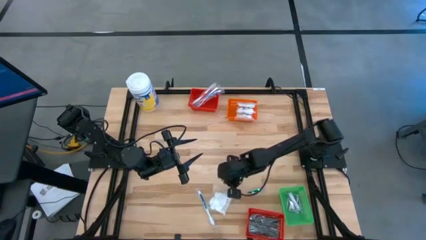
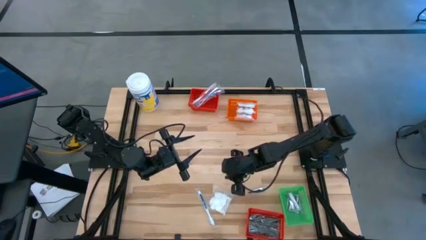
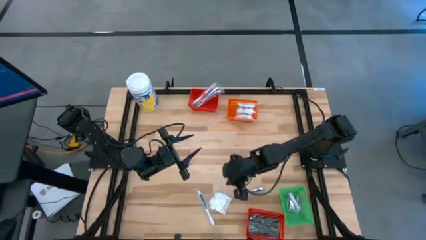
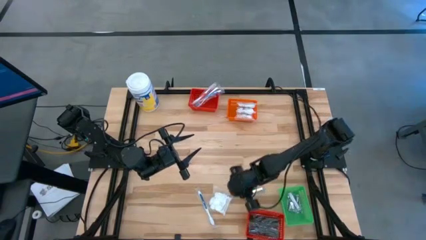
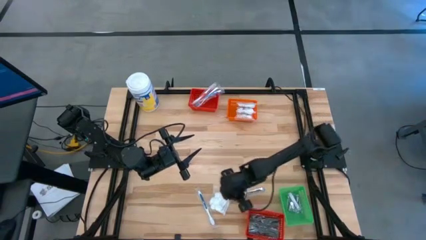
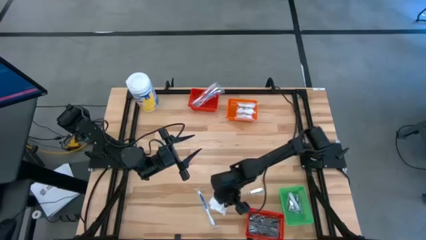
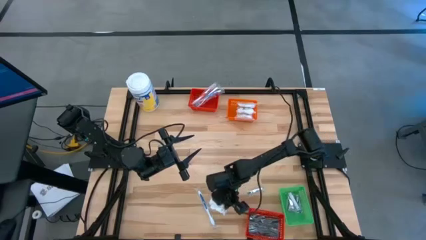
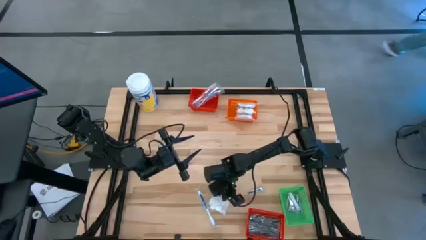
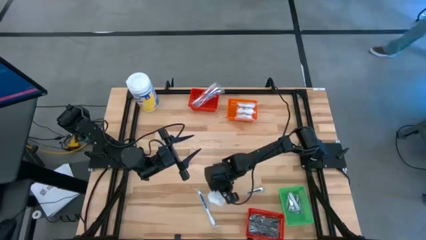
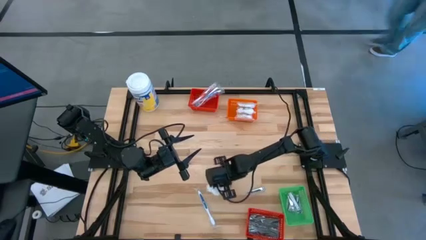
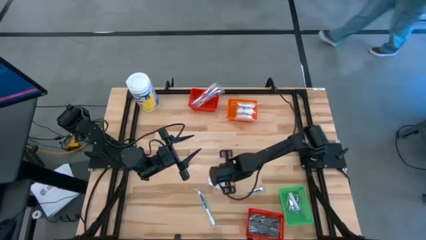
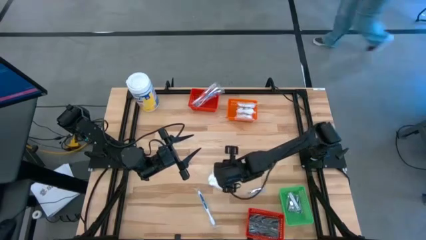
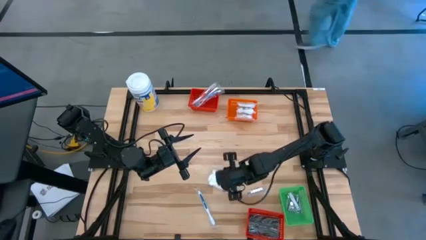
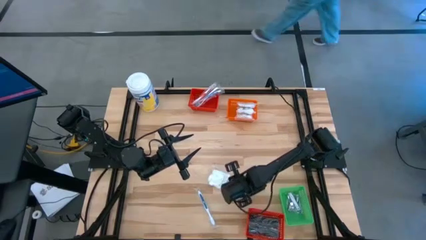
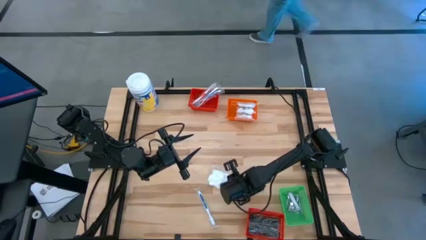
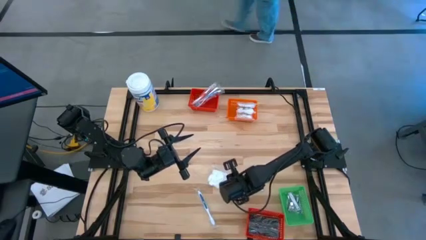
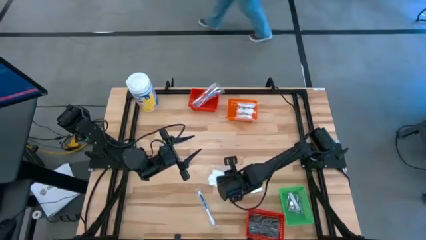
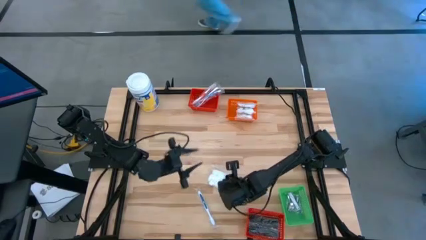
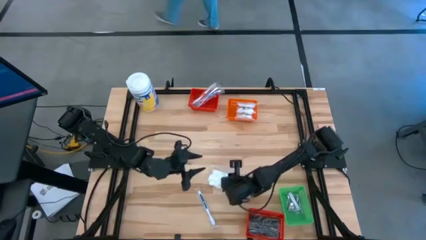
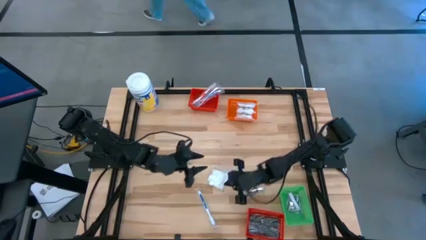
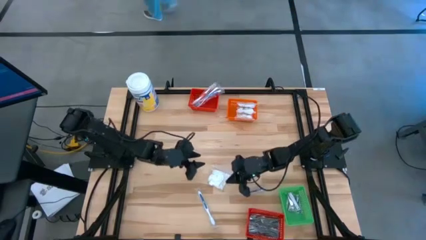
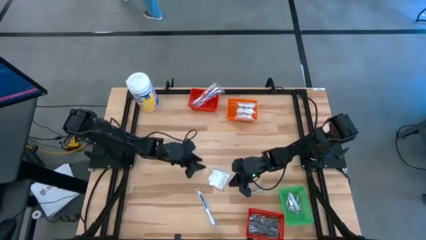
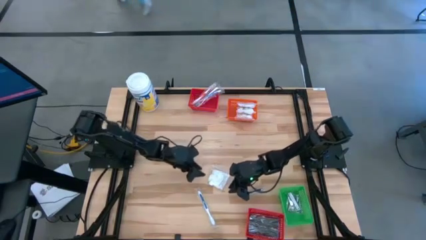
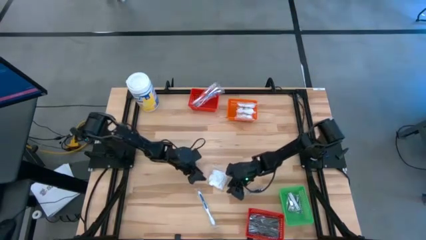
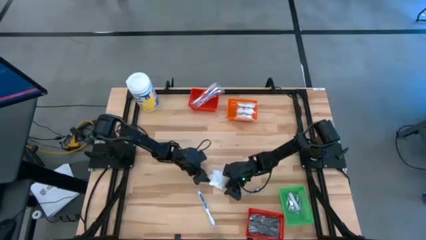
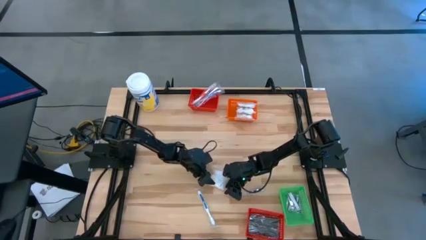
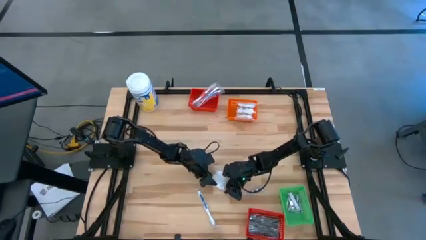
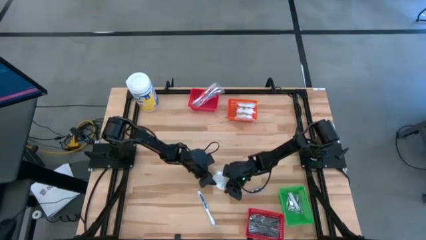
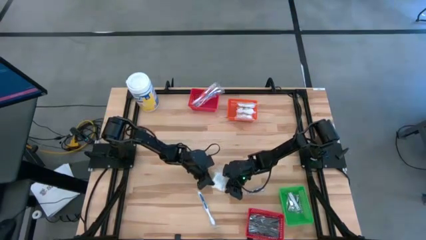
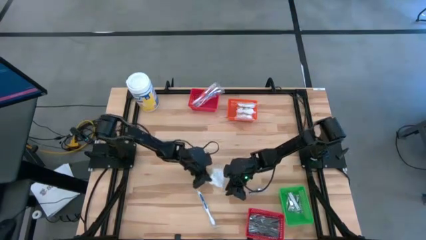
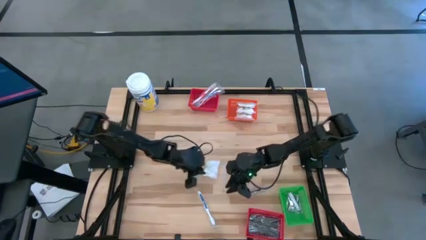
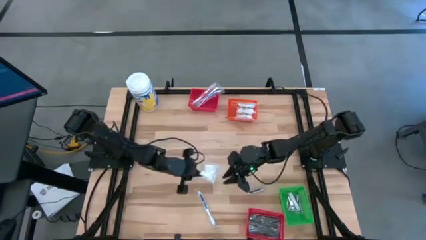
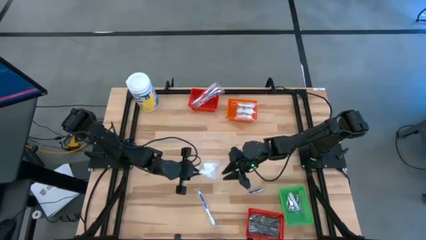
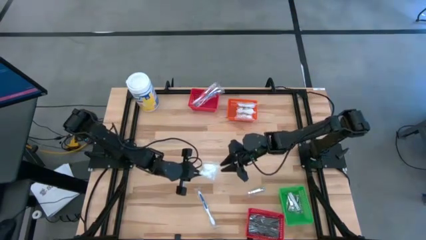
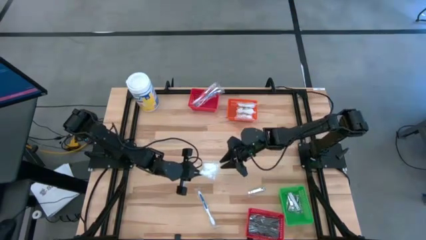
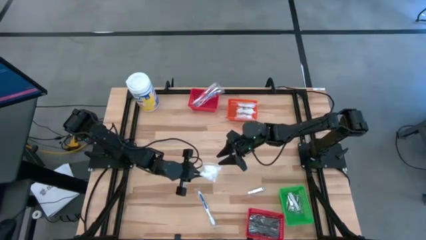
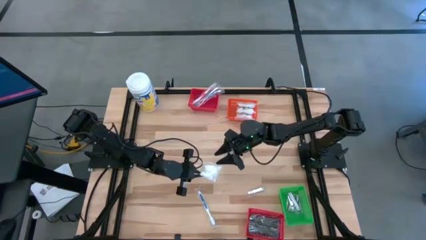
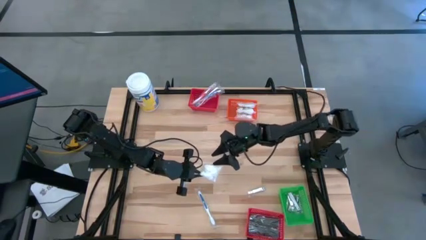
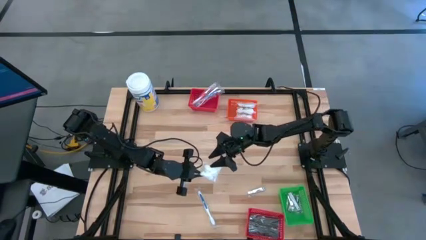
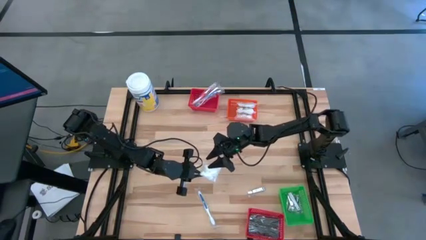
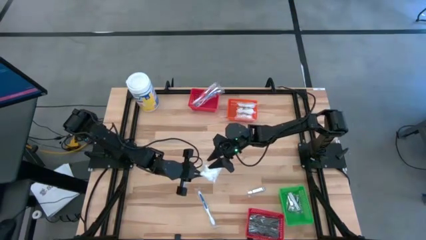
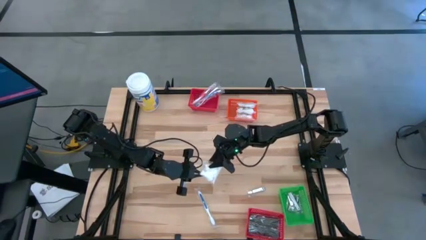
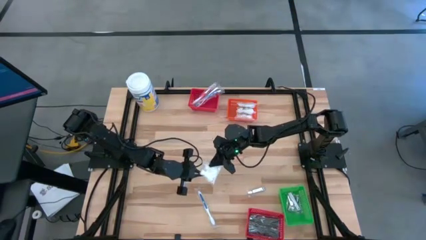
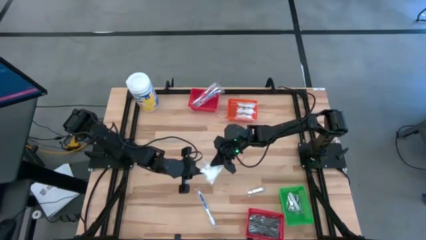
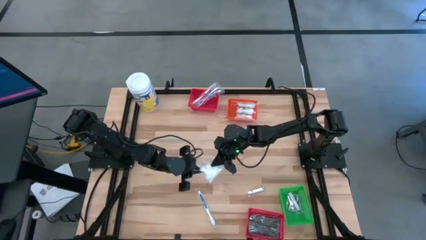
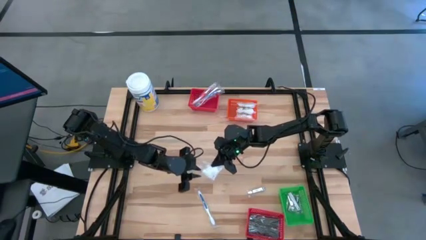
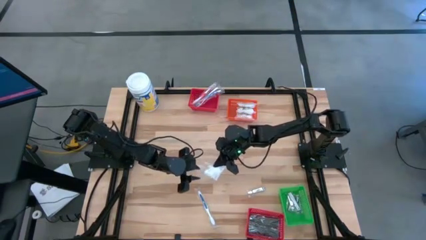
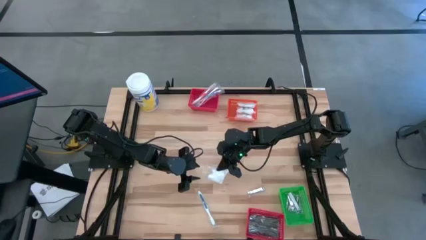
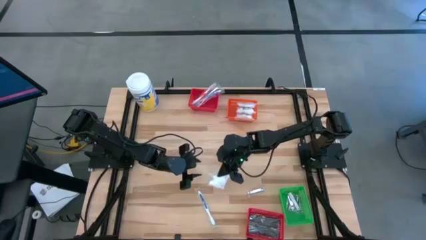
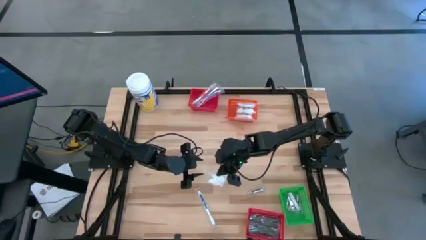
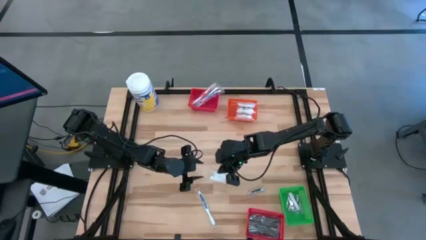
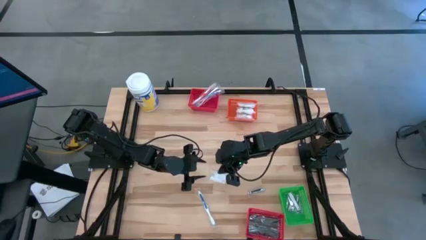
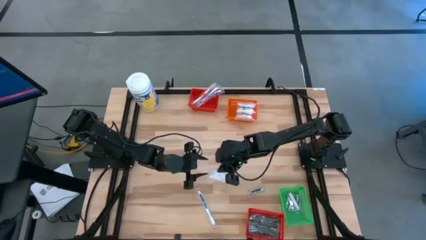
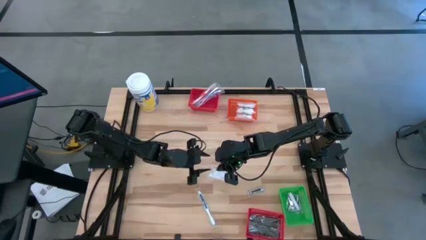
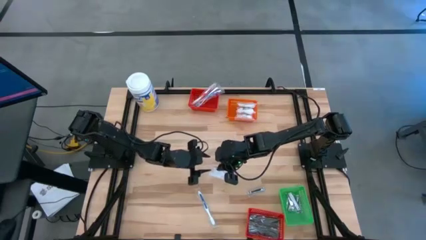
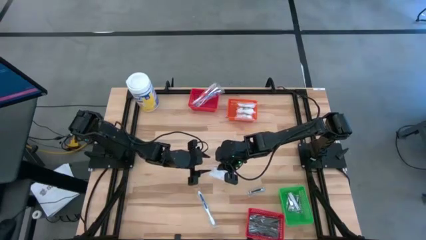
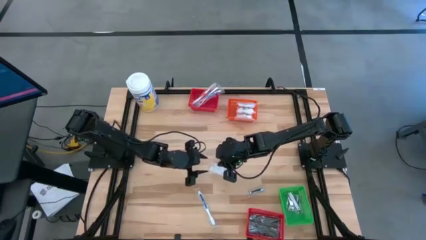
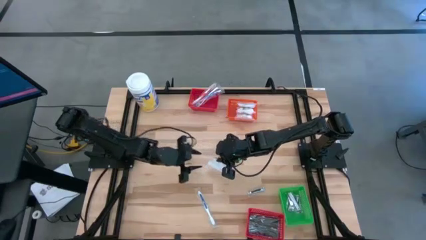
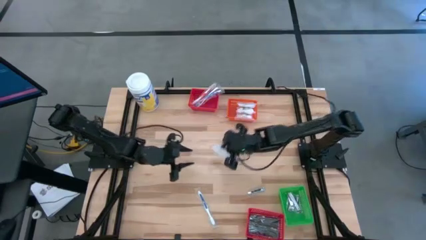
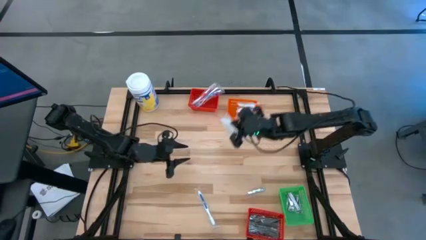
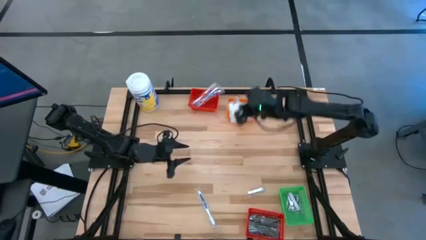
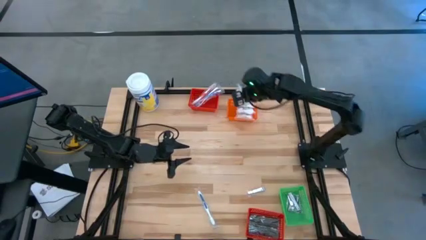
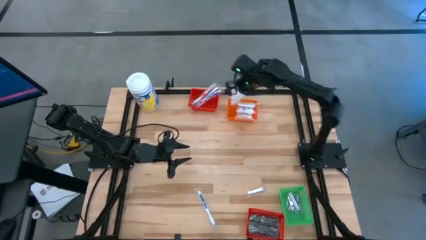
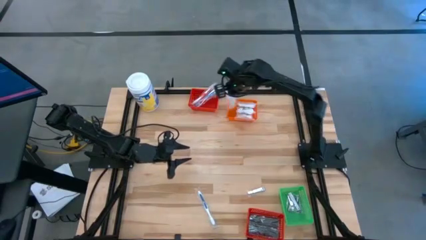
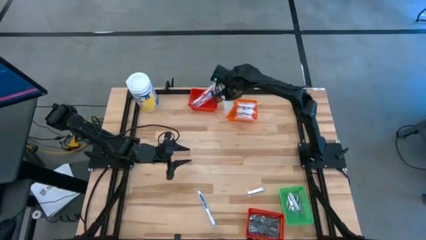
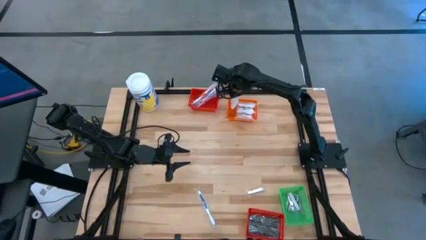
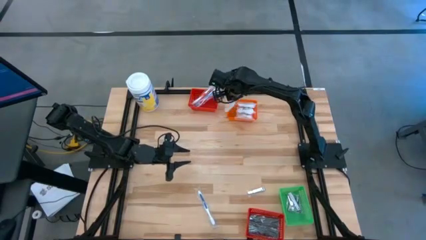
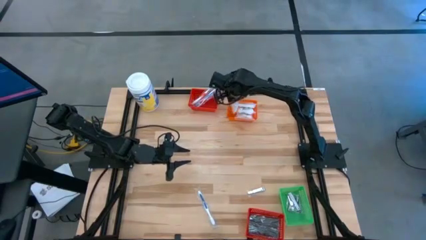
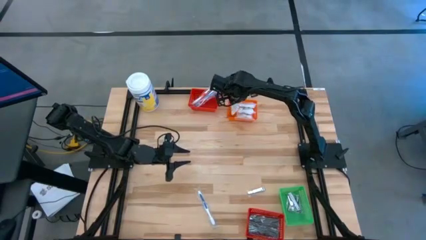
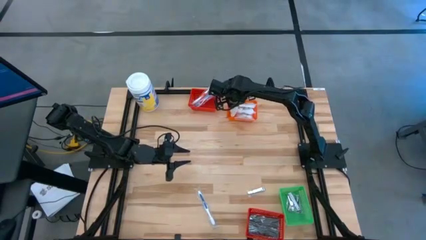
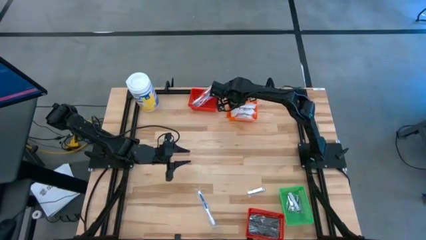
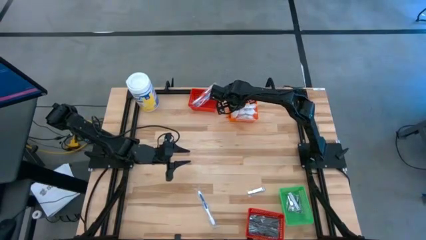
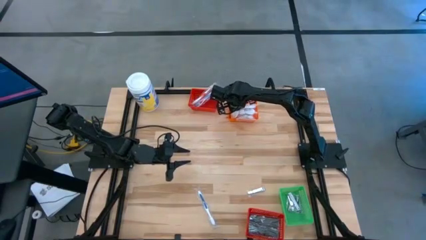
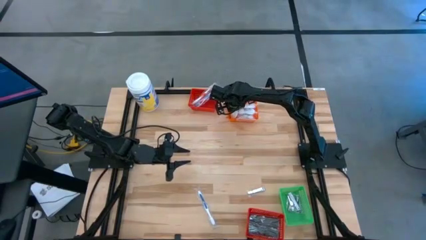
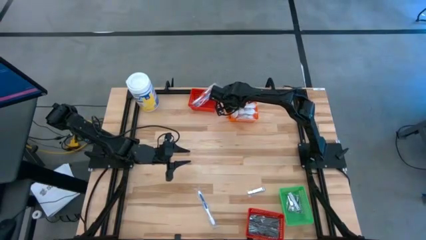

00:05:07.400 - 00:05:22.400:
Task: Pick & Place Travel size toiletries
Put the white cotton pack into the orange bin
